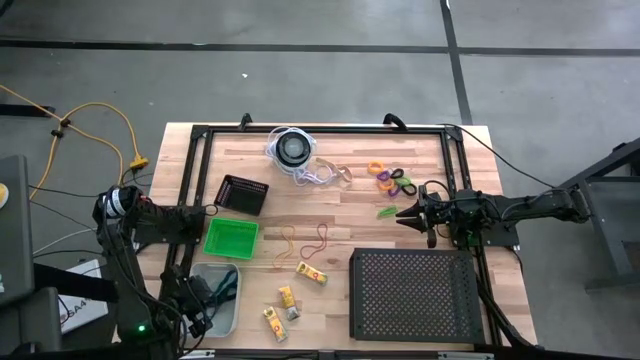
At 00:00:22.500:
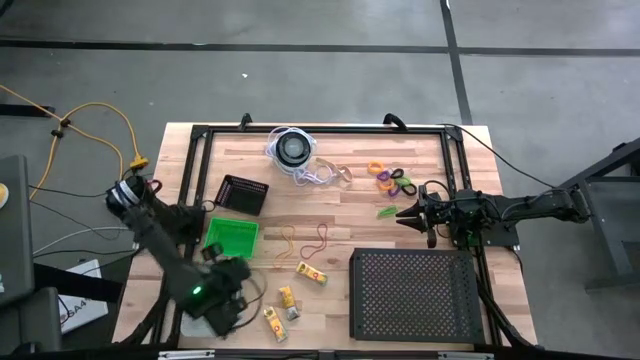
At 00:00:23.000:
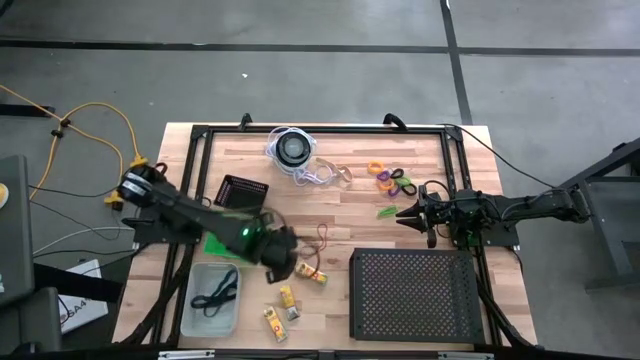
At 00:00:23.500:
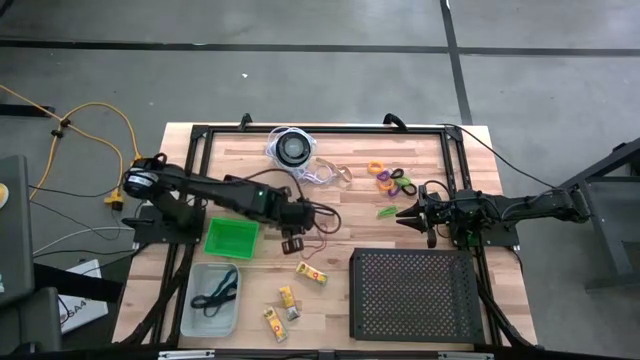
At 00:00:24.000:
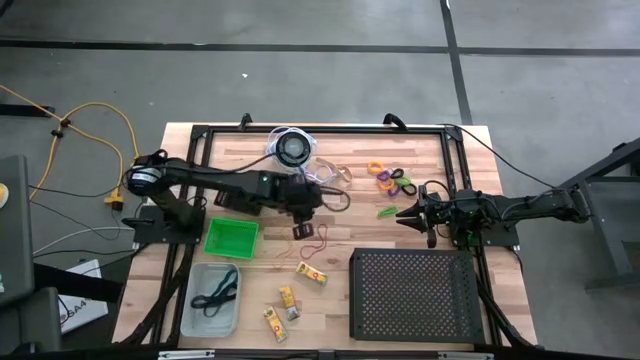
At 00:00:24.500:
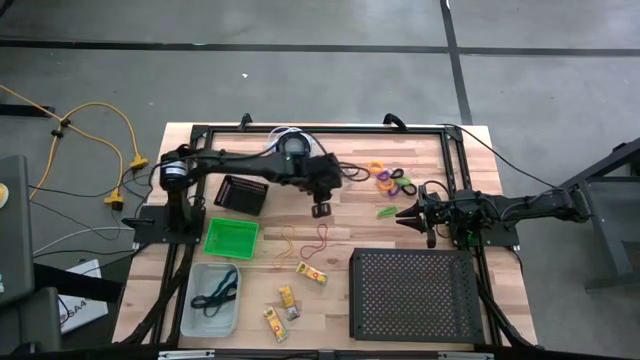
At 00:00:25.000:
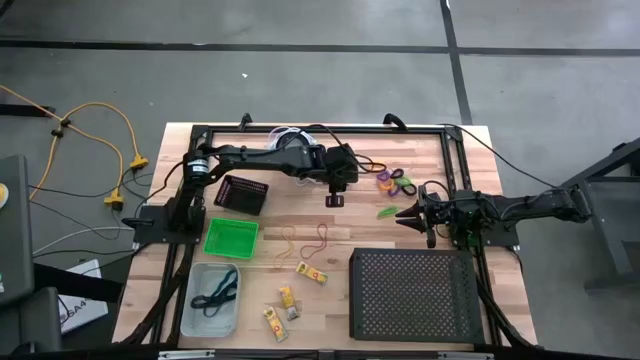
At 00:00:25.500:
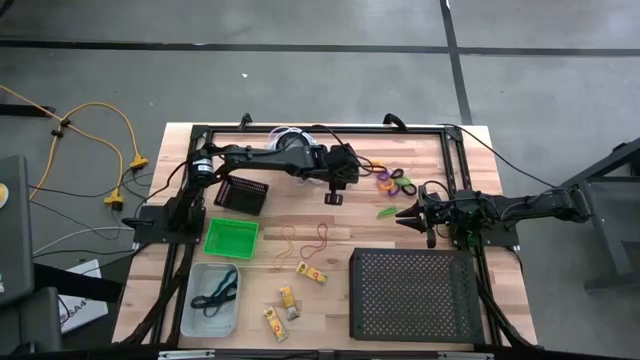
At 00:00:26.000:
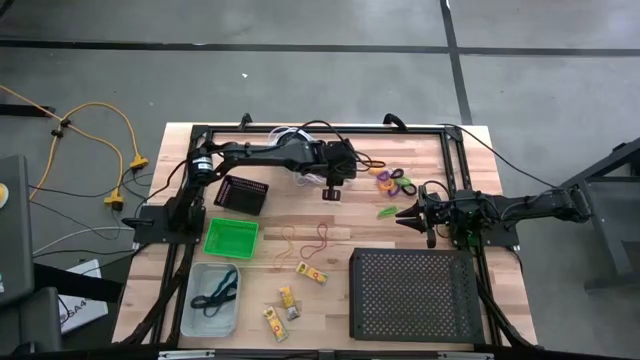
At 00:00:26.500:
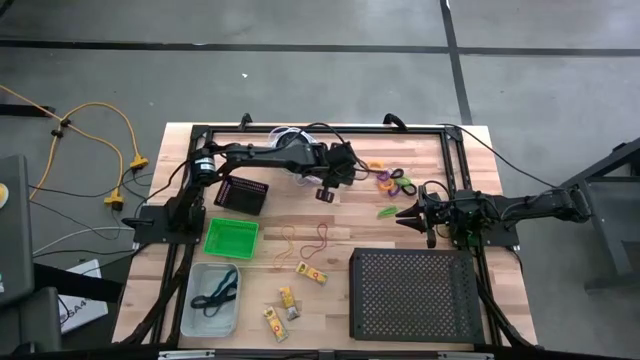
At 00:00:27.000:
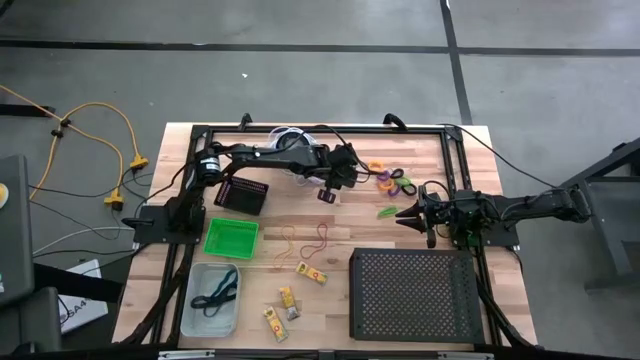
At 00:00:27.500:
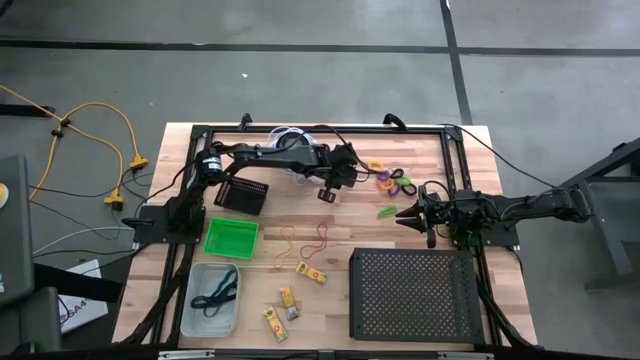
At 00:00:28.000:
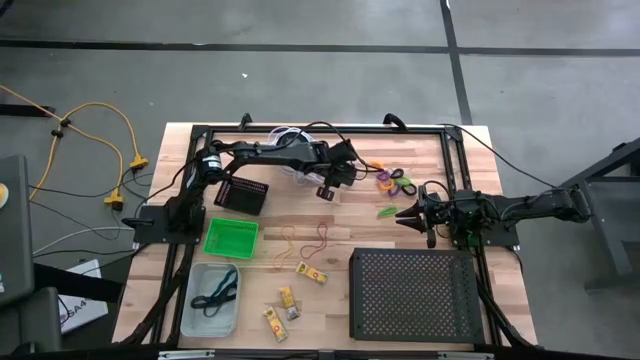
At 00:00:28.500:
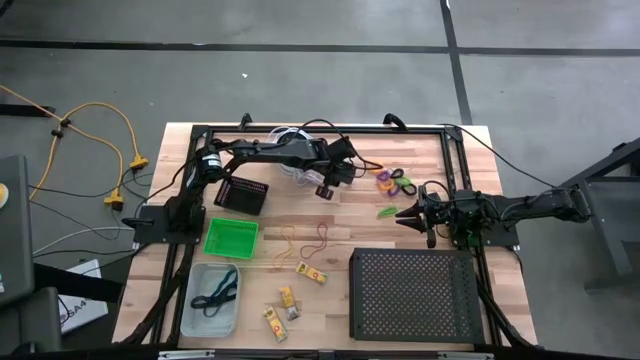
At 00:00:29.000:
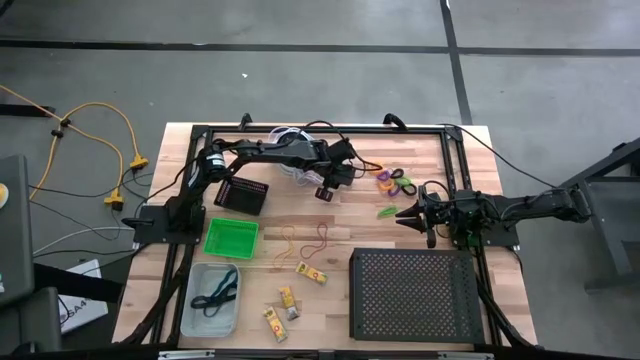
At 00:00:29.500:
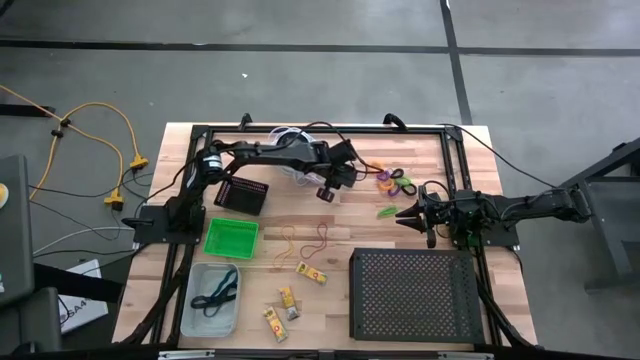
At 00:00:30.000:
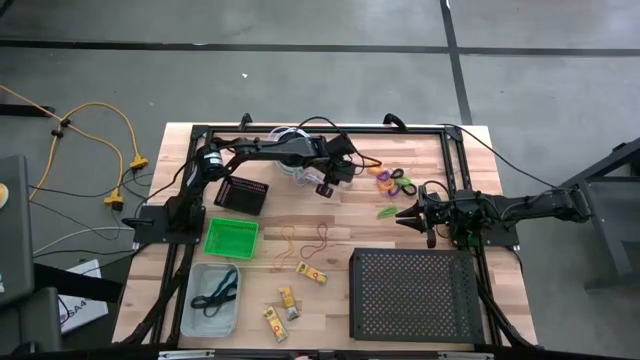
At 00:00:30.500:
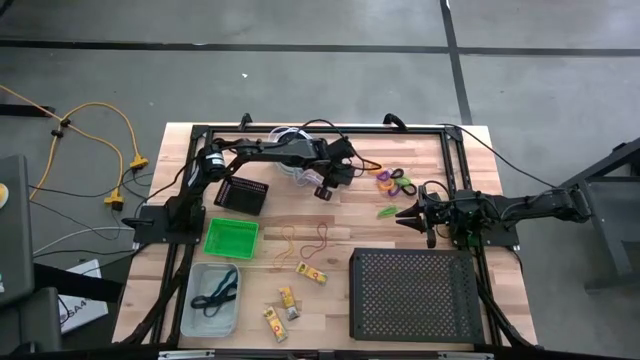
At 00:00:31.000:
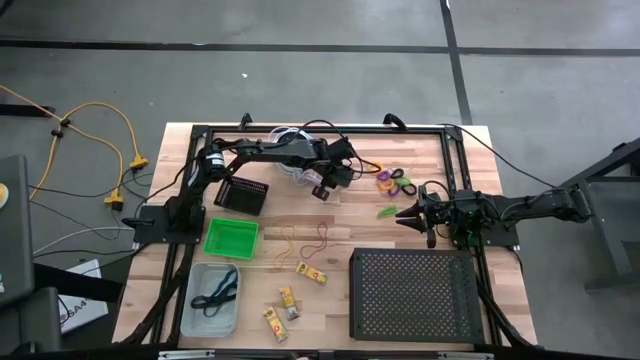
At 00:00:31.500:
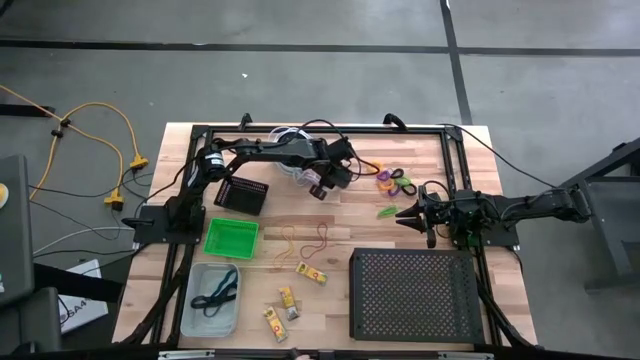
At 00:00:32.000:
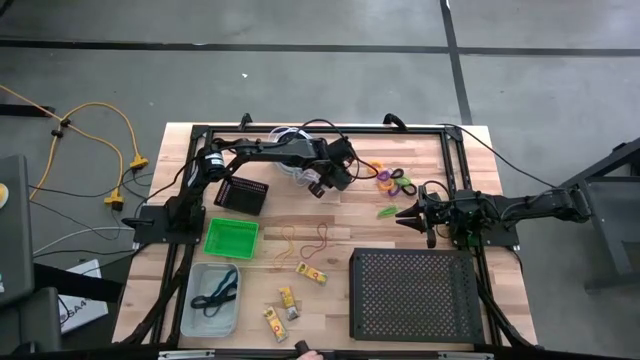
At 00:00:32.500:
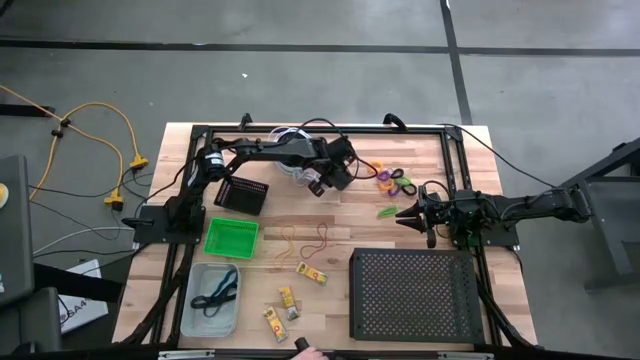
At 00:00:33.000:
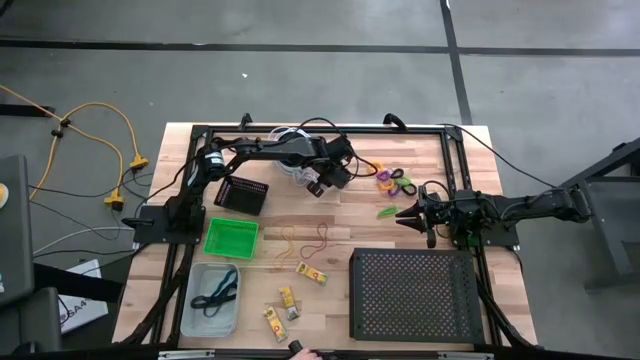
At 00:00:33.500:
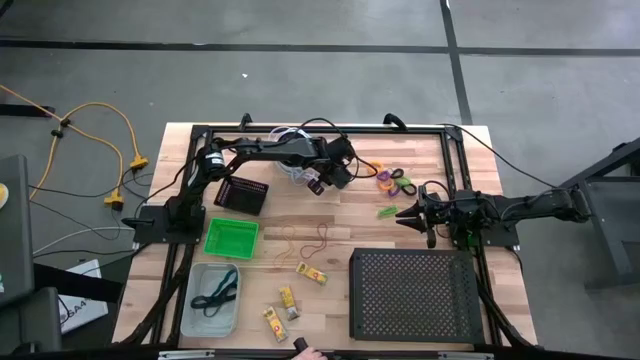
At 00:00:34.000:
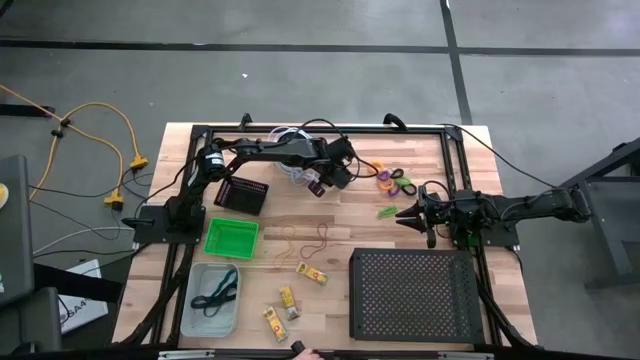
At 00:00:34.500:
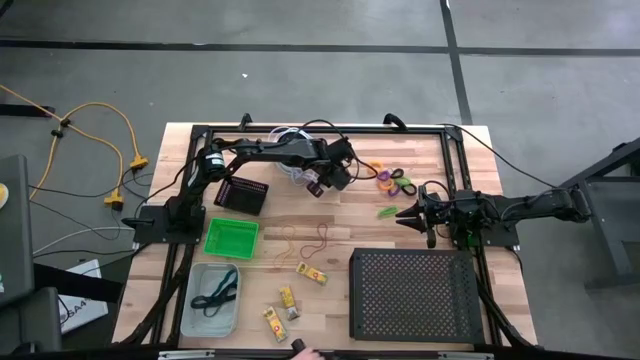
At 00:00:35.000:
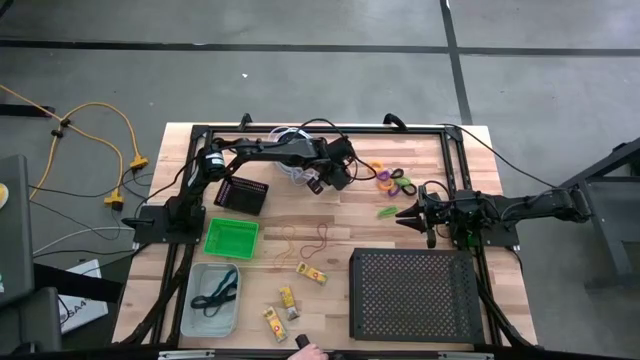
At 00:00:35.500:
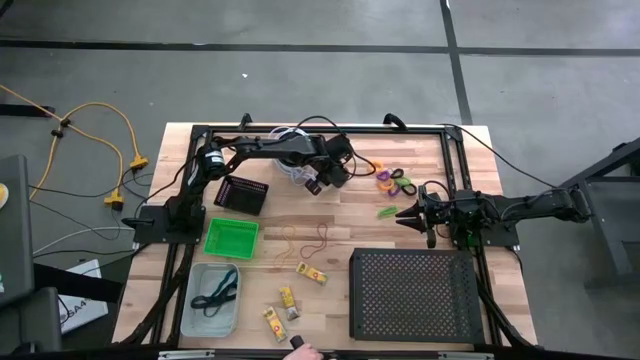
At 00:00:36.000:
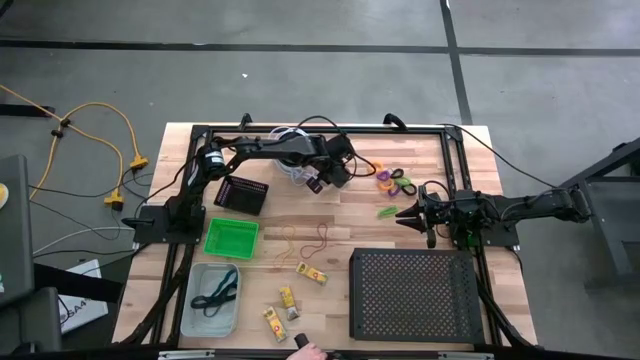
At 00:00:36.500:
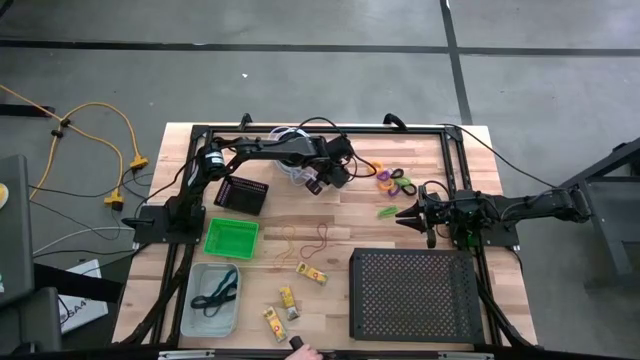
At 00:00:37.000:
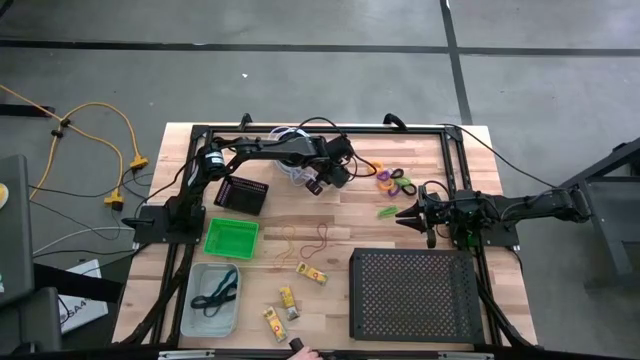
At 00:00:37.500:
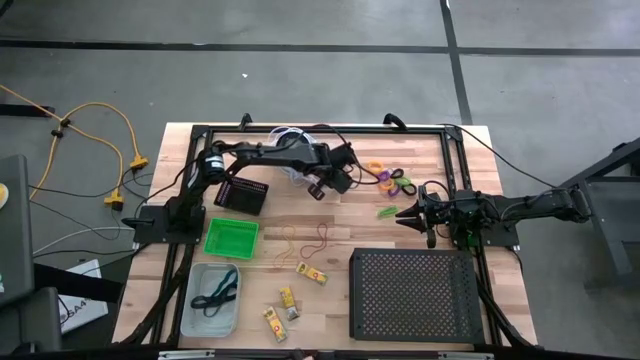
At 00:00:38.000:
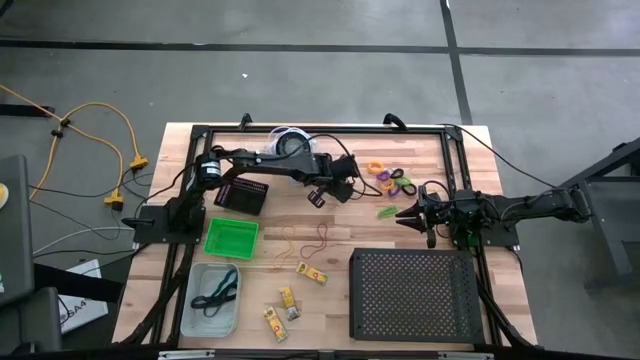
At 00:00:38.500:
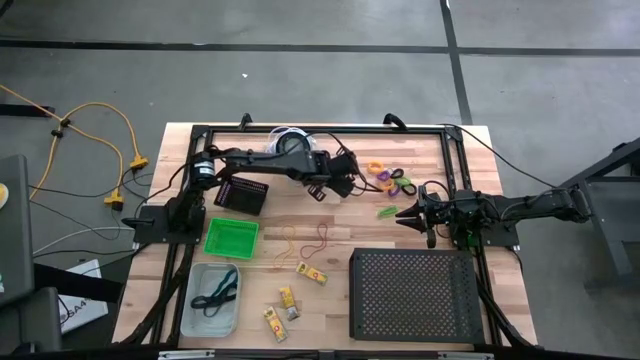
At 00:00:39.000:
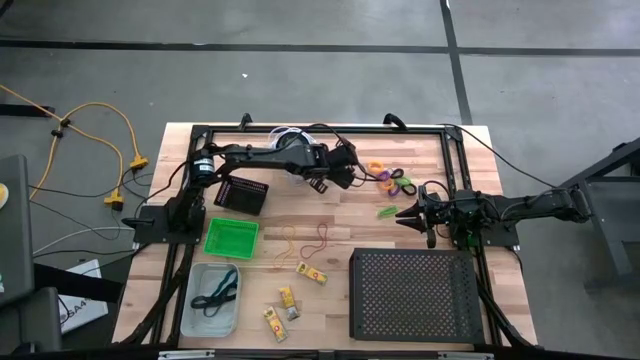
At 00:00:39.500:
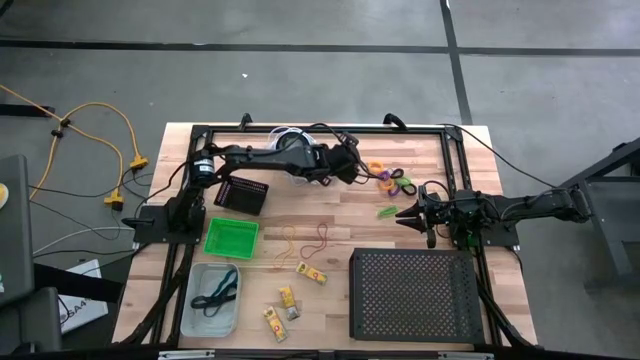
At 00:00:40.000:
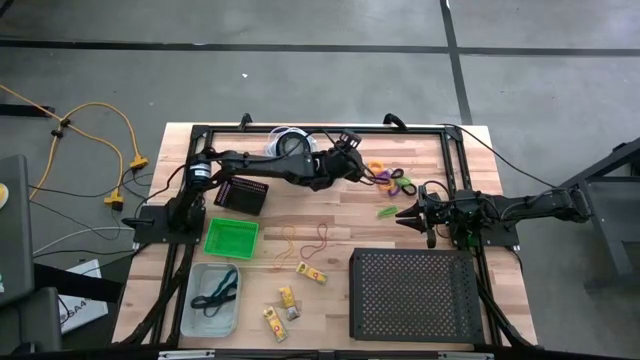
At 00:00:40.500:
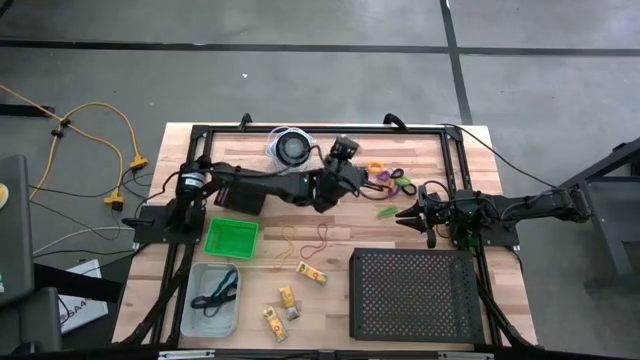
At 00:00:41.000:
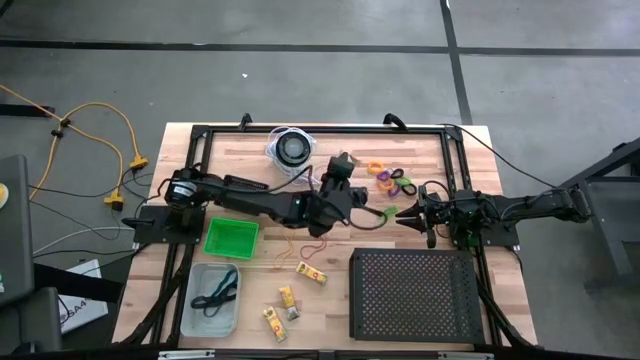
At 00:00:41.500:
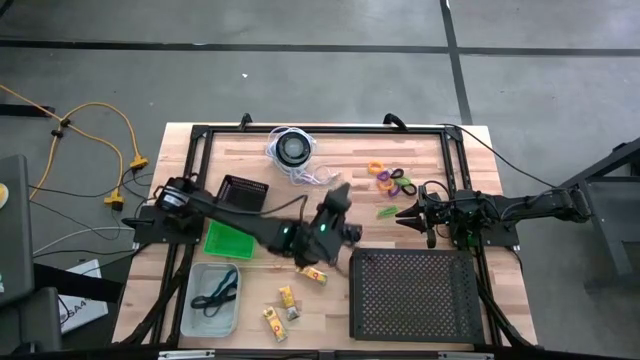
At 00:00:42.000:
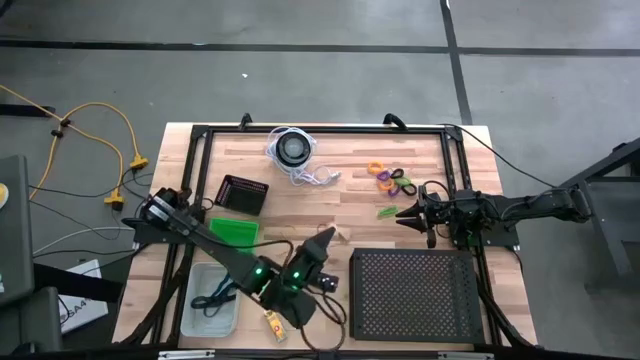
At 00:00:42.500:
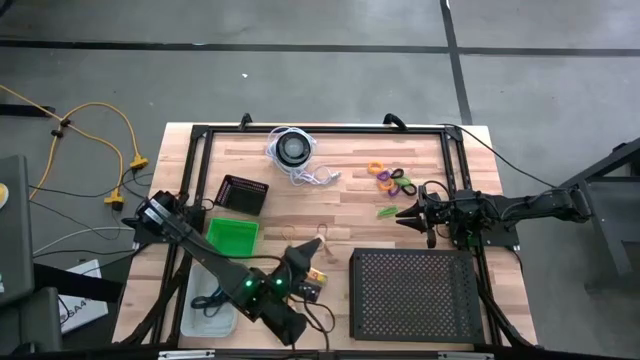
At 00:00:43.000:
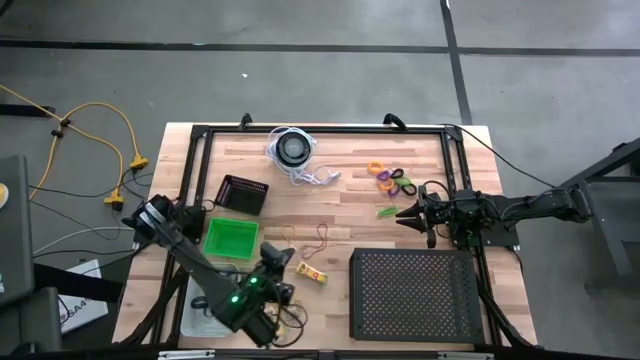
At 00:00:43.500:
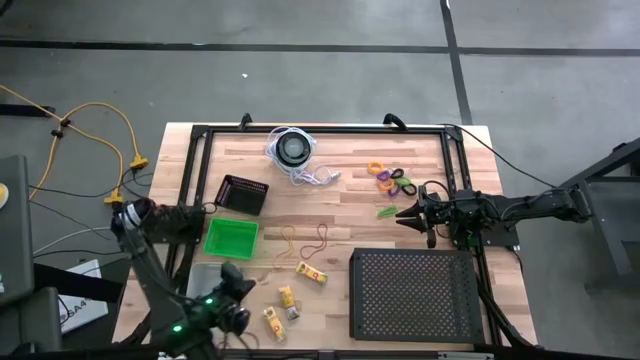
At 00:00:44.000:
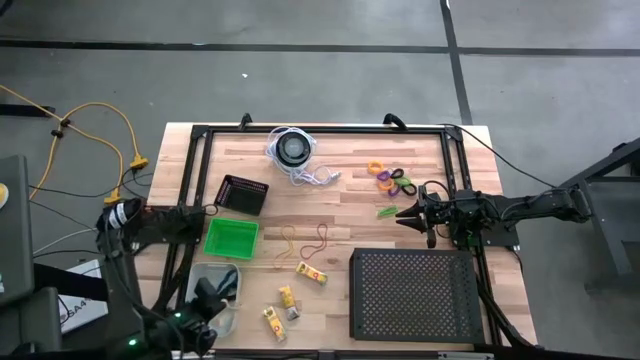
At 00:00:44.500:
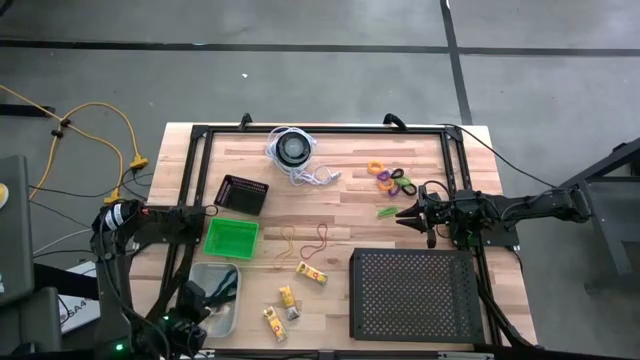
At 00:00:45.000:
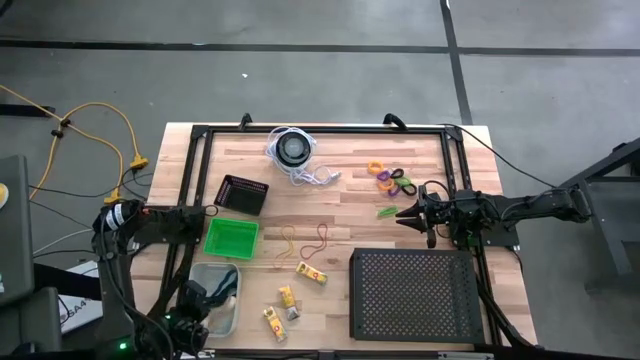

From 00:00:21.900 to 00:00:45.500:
Task: Pick & Place Office Desk Supplies
Put the beige rubber band into the gray bin
